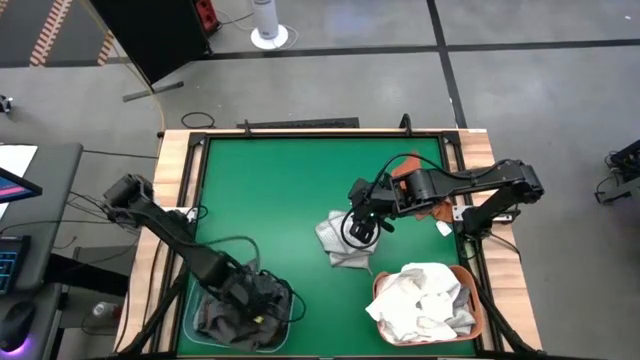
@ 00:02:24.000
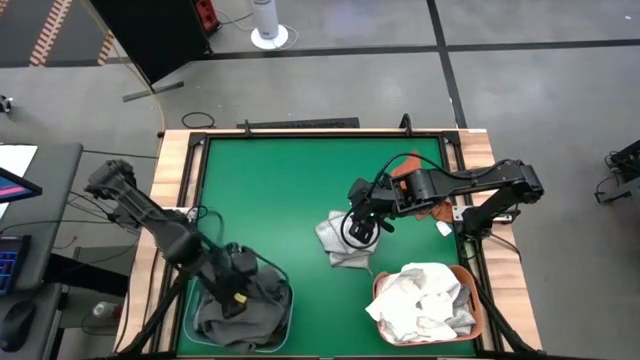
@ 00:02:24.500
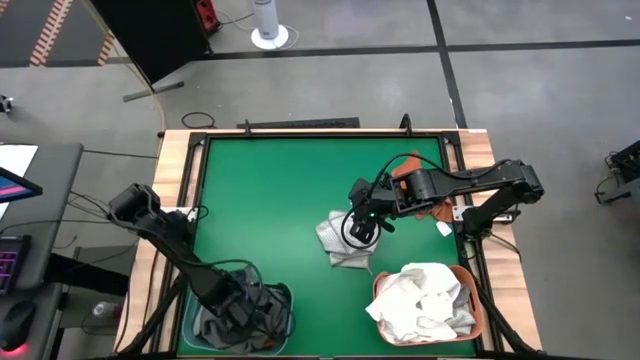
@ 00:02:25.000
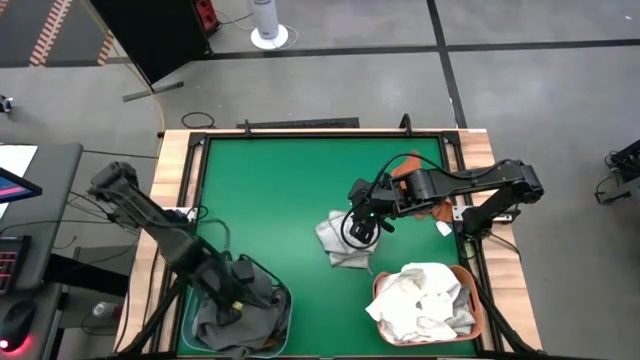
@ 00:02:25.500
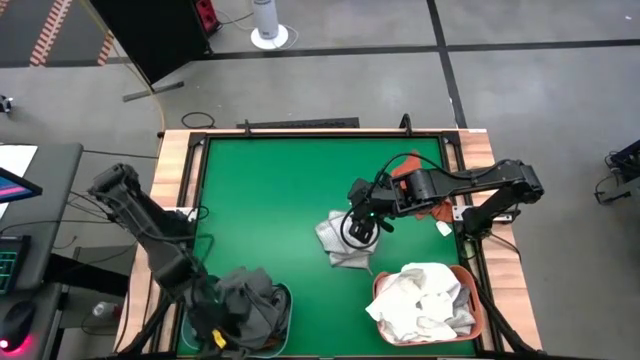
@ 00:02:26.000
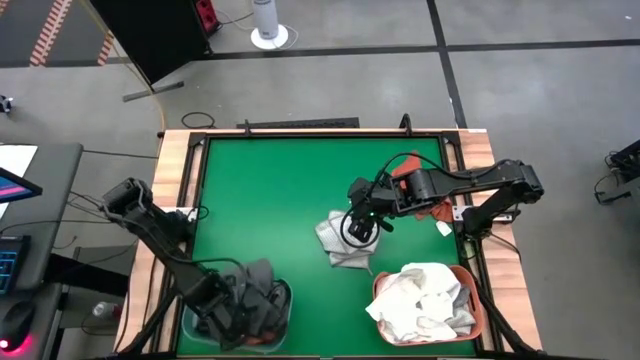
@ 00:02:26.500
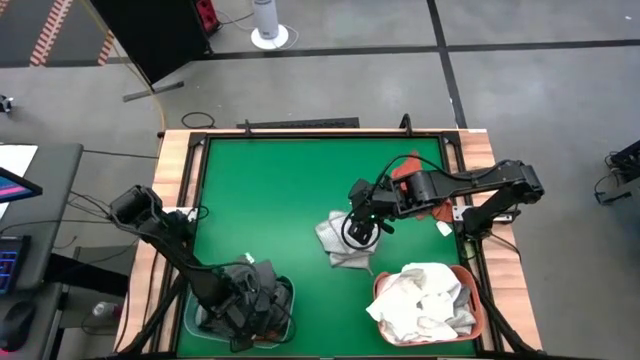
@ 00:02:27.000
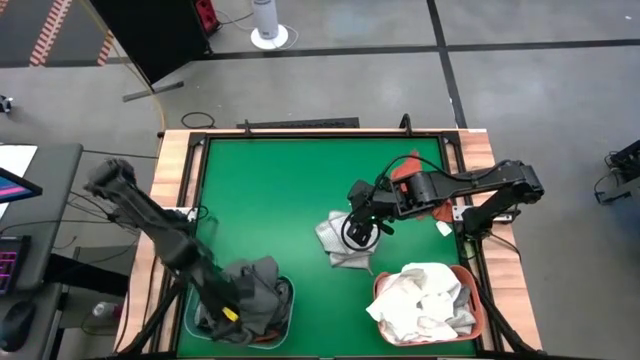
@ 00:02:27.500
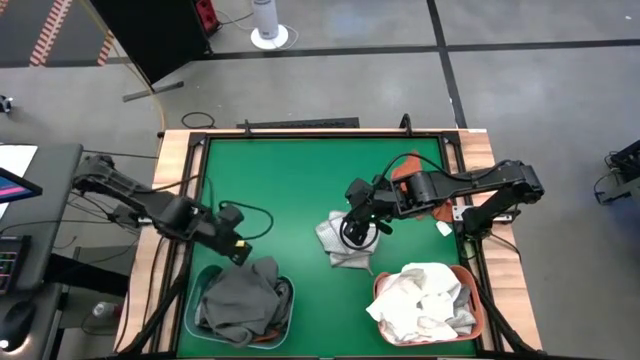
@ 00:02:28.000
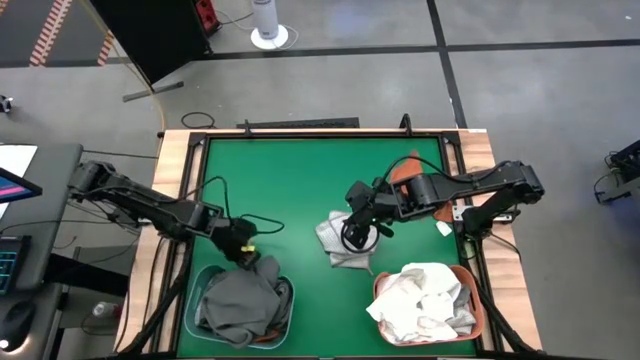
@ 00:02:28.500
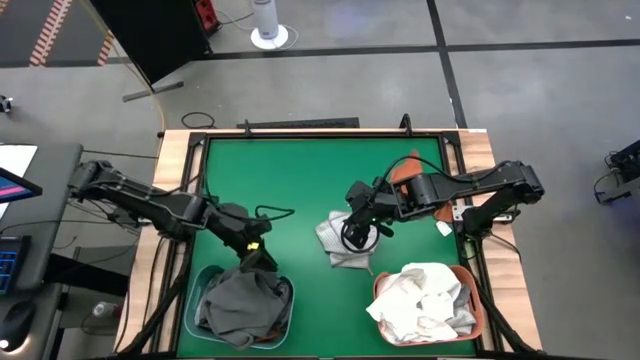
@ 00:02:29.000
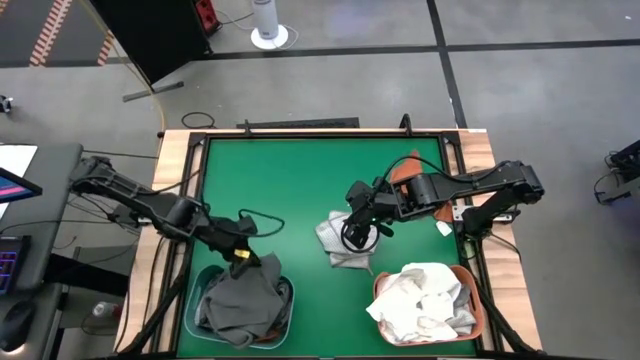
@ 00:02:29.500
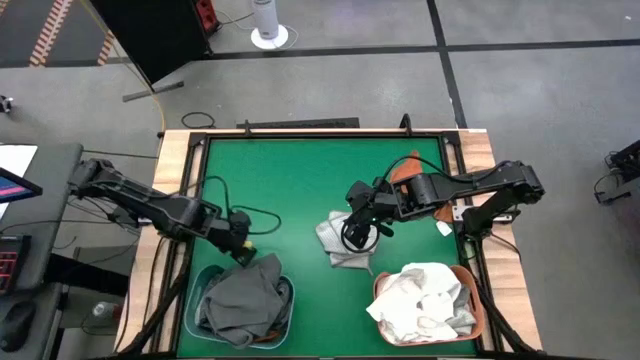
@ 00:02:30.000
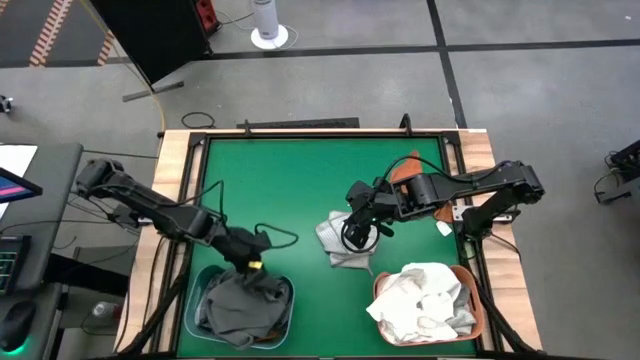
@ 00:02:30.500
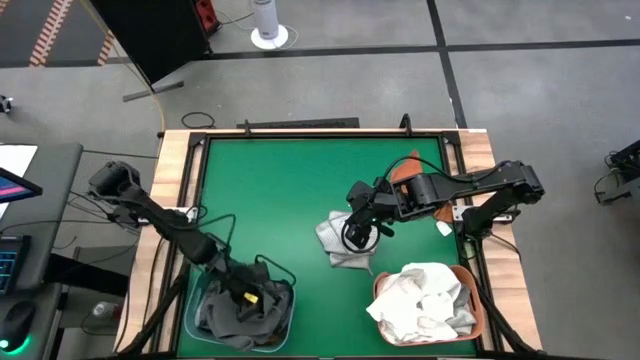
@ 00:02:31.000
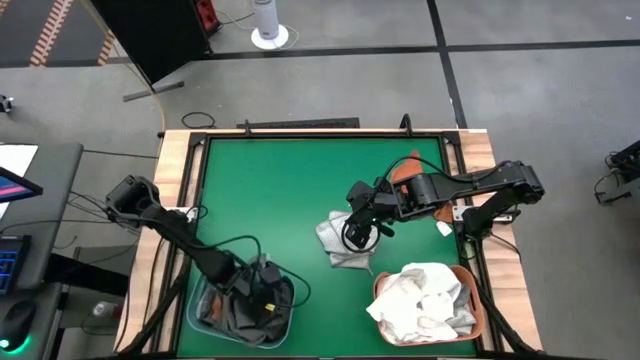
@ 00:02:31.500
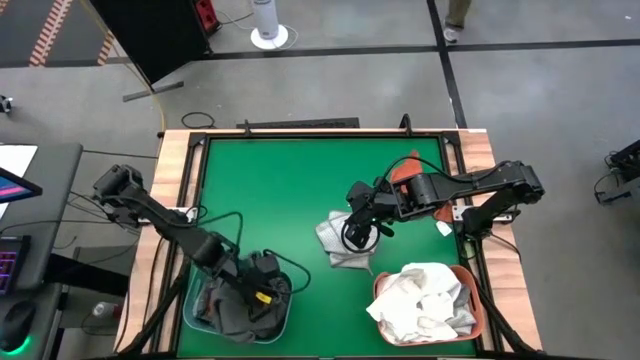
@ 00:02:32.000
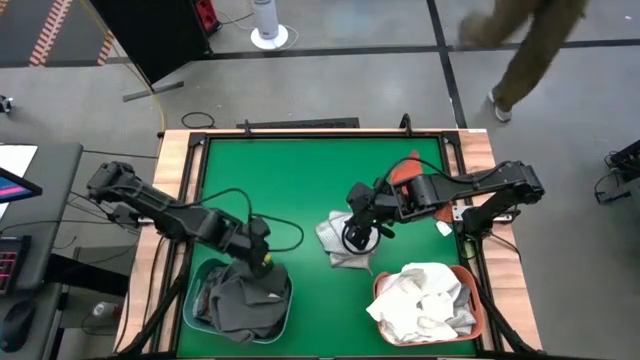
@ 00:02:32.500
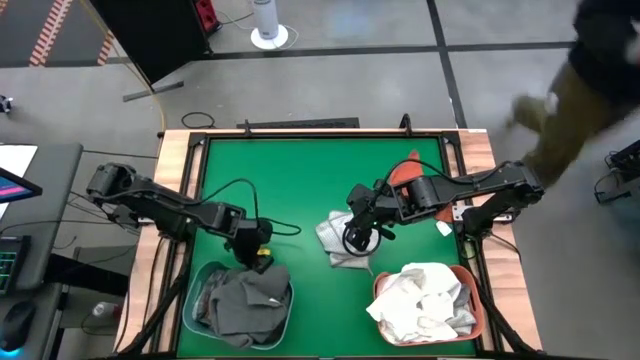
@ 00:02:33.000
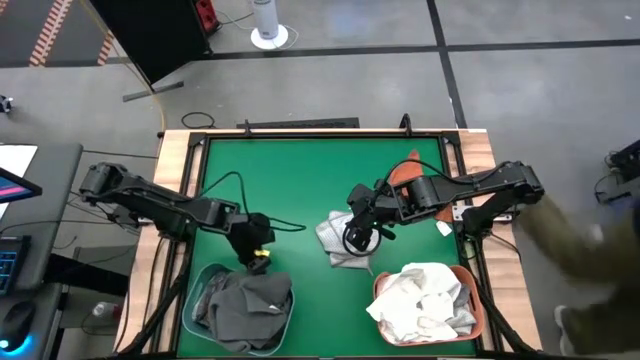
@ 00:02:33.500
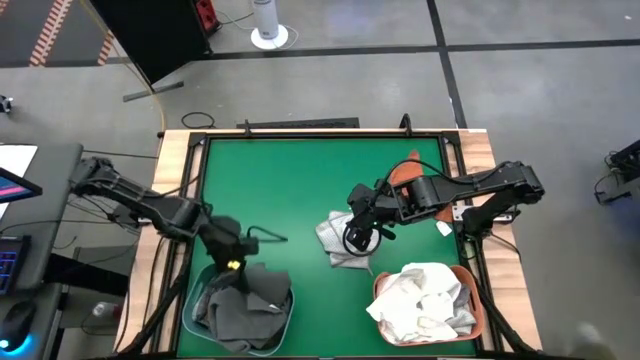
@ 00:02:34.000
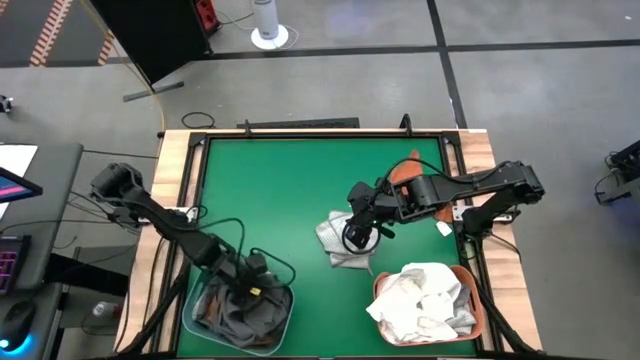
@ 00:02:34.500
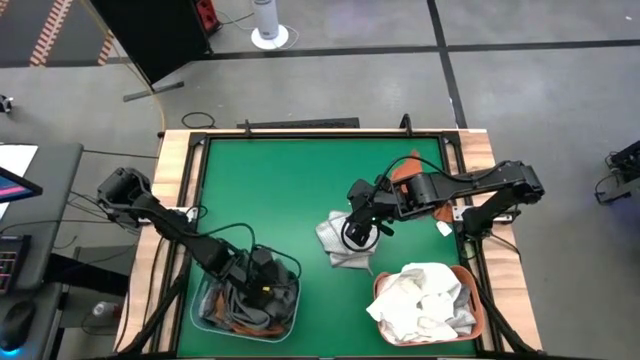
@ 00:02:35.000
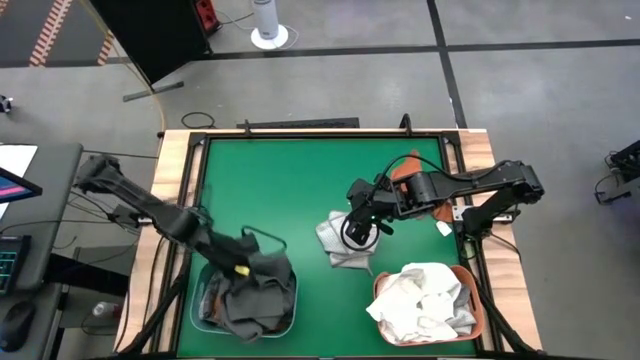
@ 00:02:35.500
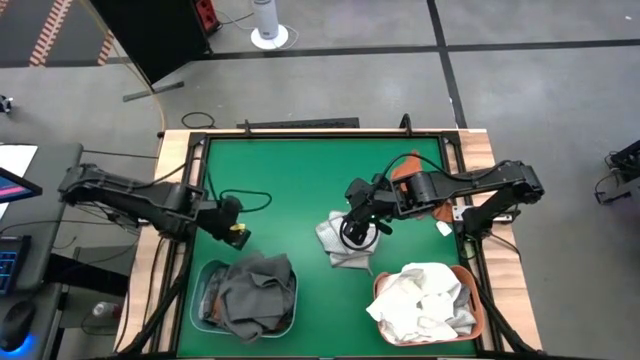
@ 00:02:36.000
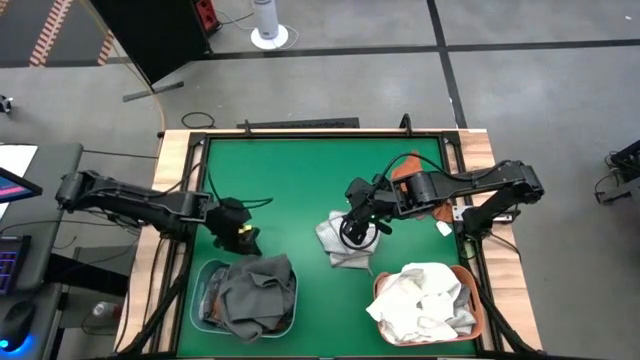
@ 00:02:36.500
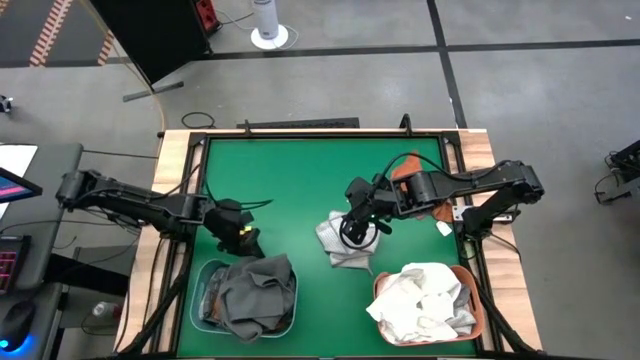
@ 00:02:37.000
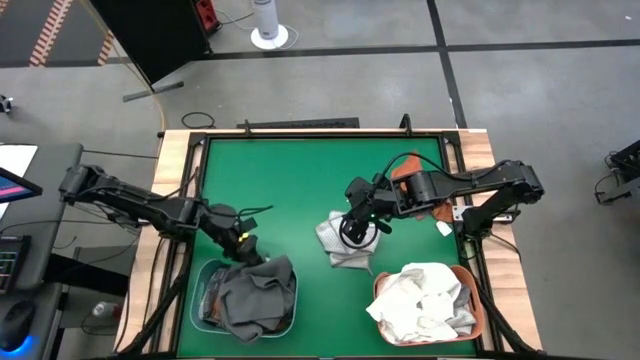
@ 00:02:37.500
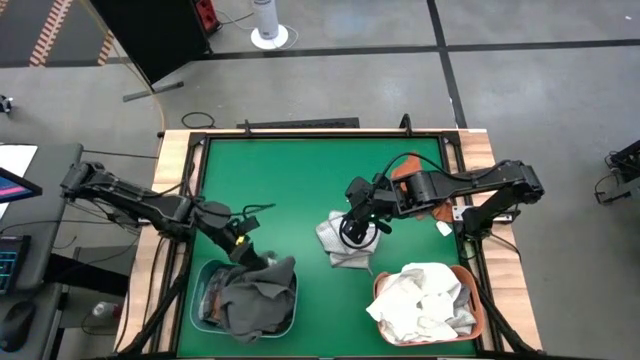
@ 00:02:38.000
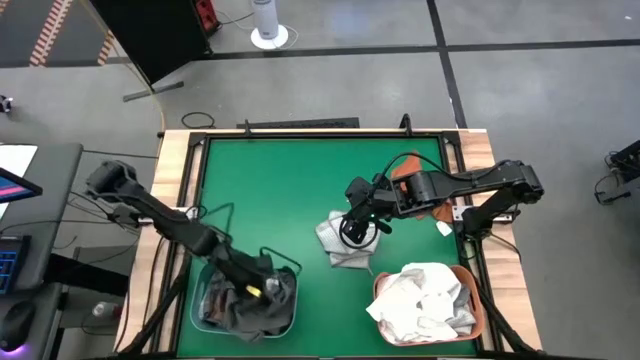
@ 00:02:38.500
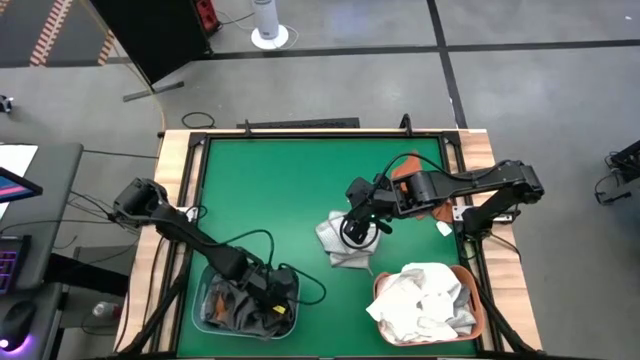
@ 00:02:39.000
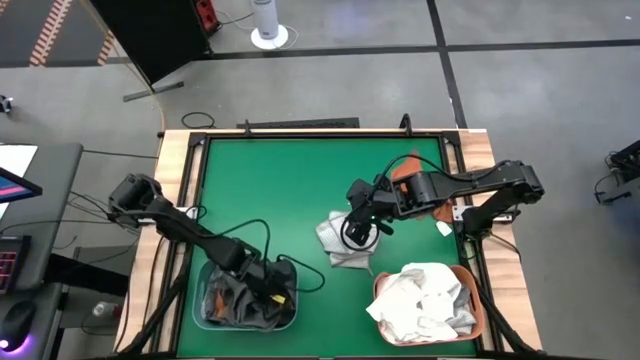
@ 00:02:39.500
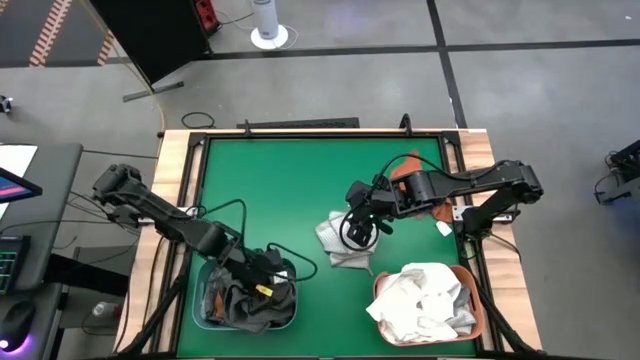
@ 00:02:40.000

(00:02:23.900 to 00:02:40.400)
Task: Sort towels by color in basket
Put the gray towel into the green bin

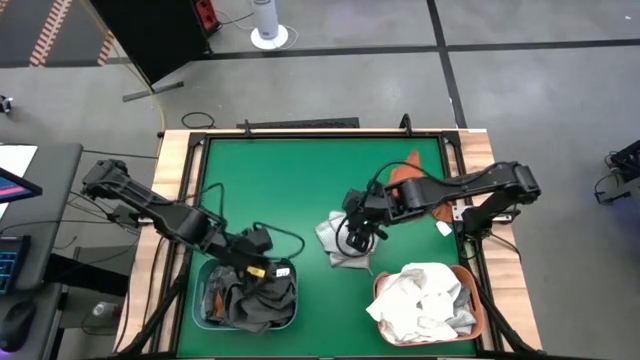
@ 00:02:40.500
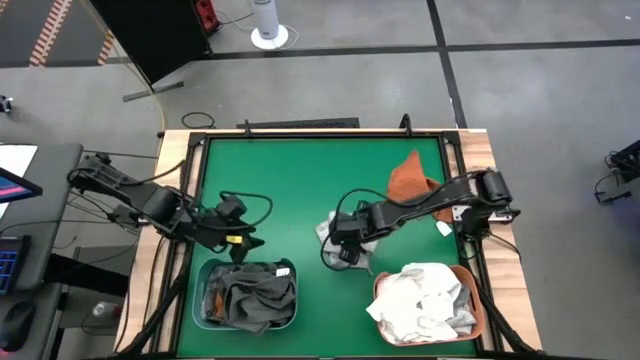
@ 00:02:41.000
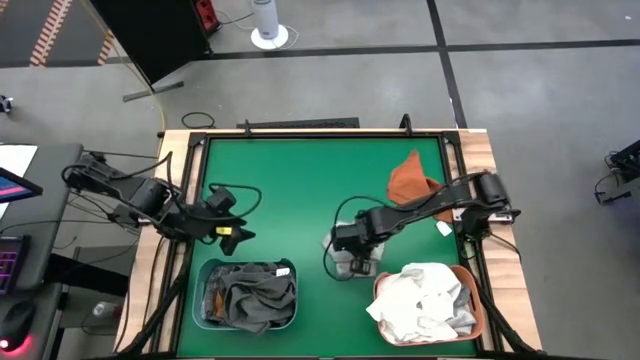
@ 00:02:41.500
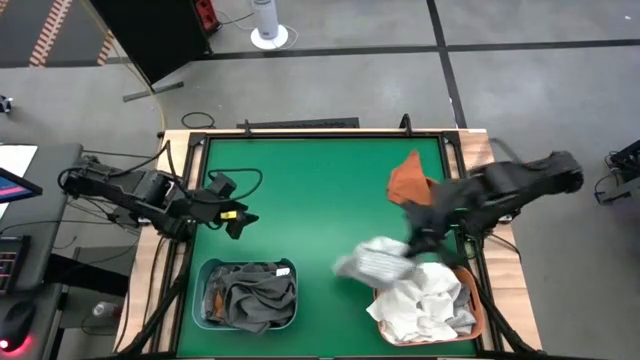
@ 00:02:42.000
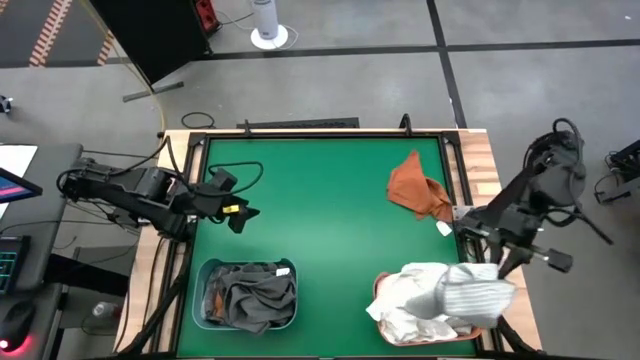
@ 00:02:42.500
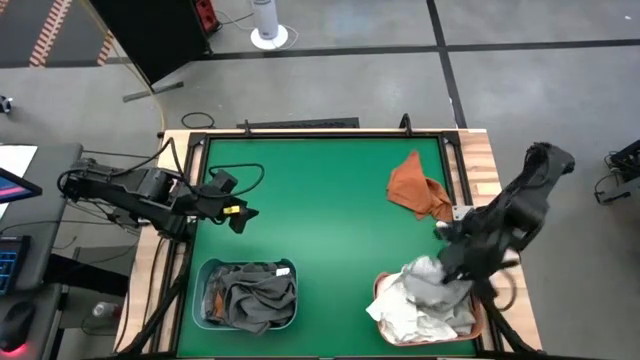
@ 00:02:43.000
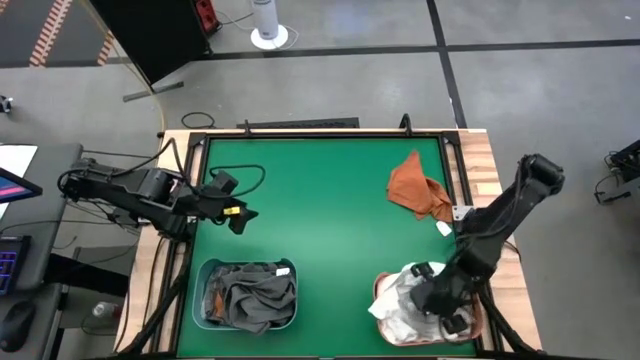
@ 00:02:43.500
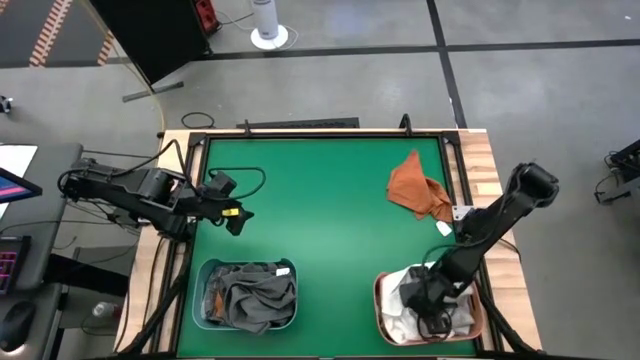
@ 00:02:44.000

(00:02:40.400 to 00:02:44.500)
Put the light gray towel into the orange bin
